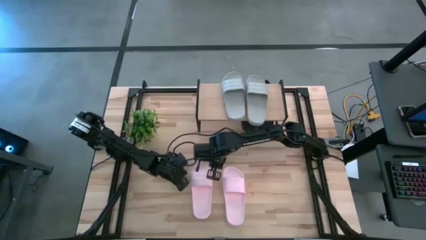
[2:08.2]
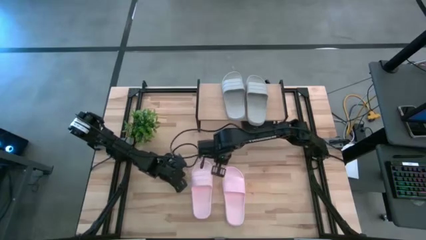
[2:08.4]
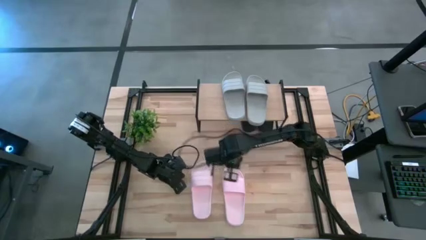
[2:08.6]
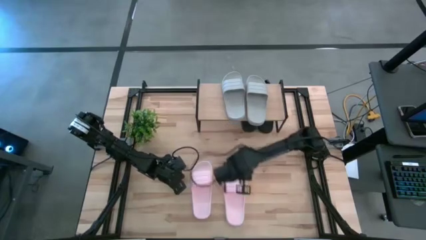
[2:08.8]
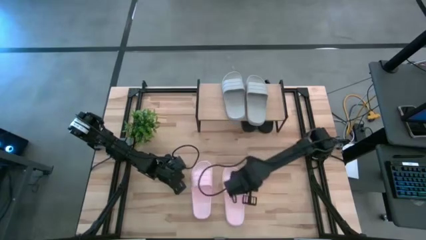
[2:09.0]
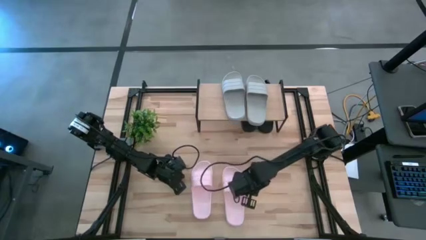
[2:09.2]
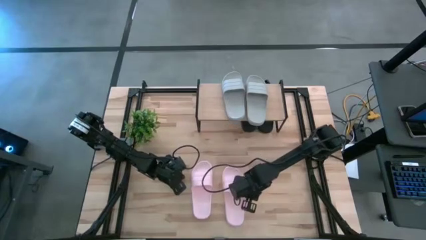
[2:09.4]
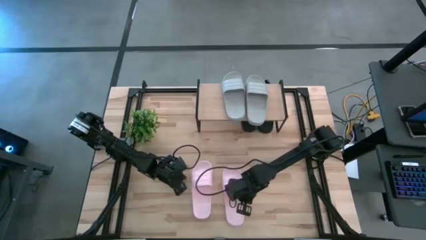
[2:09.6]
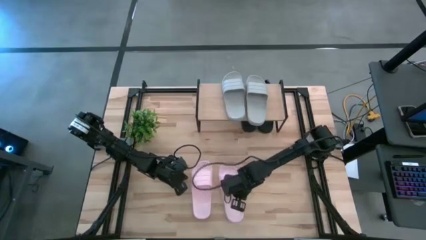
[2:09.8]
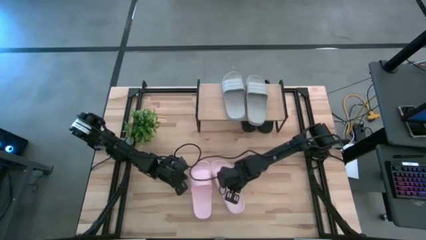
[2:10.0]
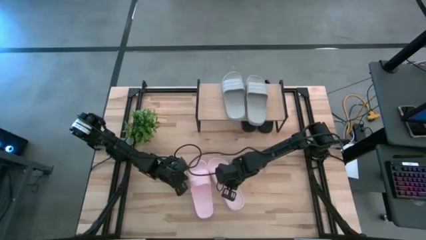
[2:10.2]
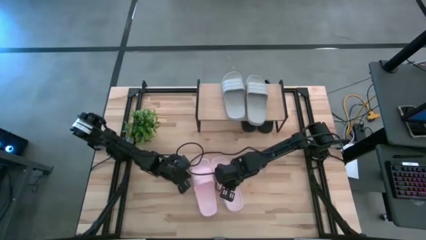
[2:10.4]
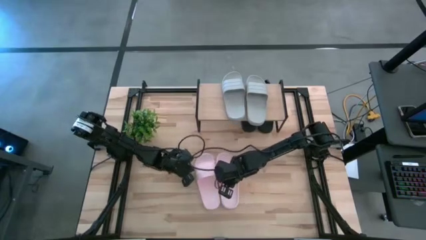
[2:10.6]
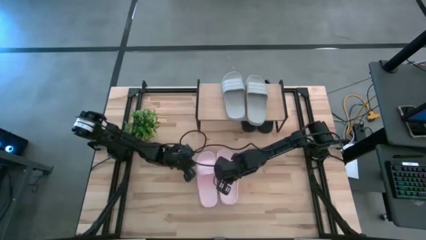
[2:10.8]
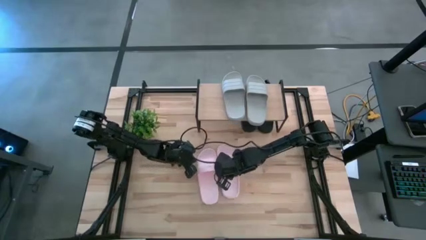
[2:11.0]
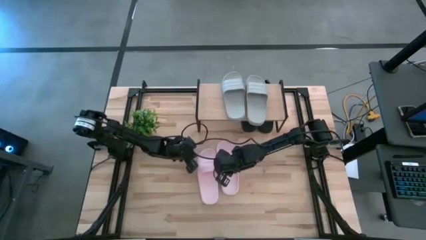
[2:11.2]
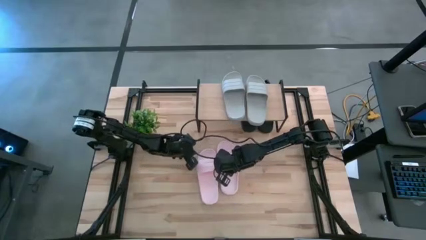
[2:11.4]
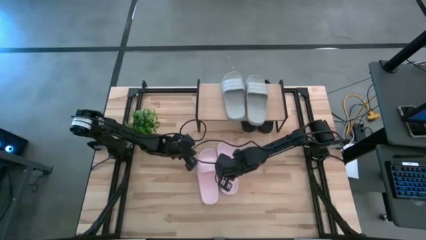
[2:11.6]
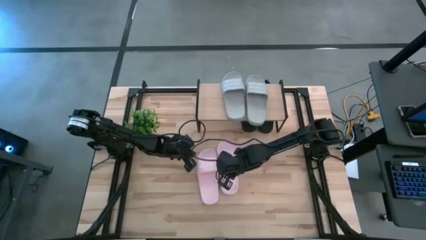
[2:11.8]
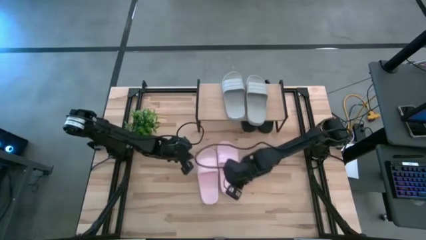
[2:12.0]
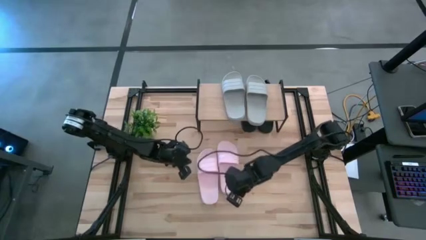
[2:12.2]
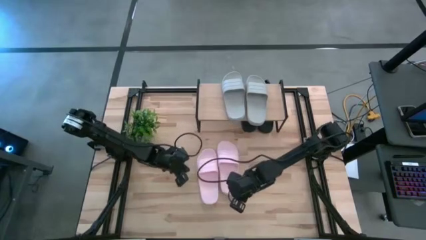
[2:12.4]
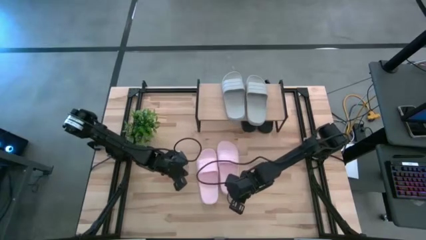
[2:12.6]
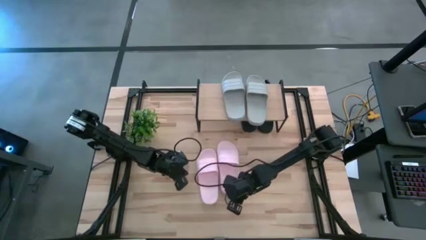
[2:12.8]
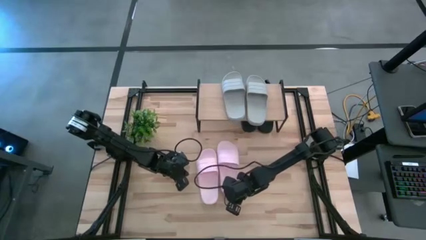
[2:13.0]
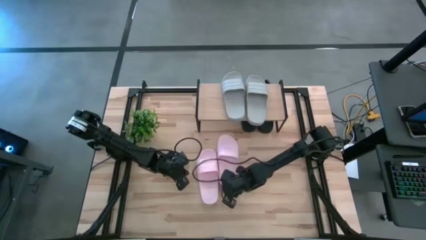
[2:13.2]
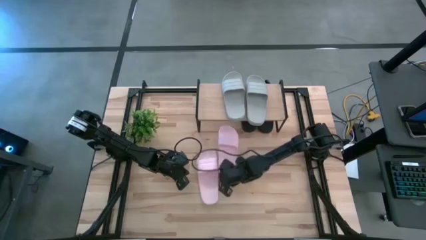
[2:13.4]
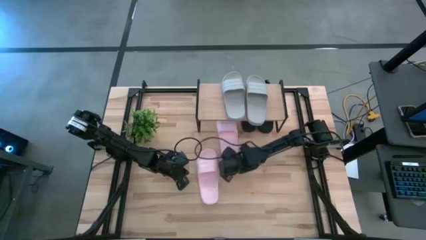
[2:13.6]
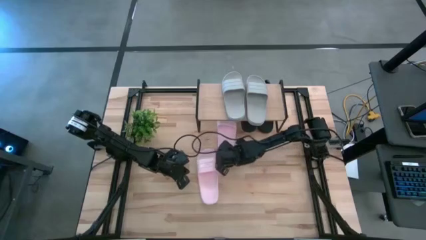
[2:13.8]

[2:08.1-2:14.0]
Task: Pick and place slides into the shelf
Move the right pink slipper under the shelf

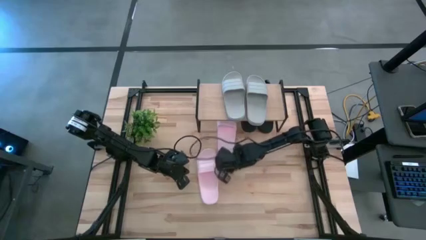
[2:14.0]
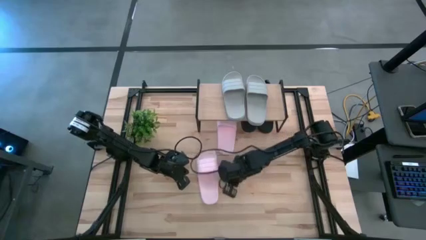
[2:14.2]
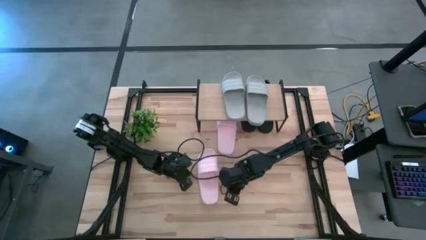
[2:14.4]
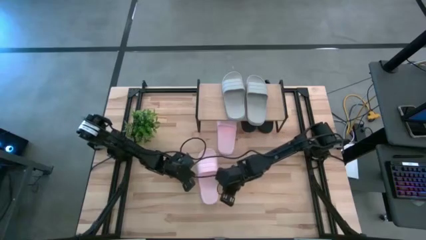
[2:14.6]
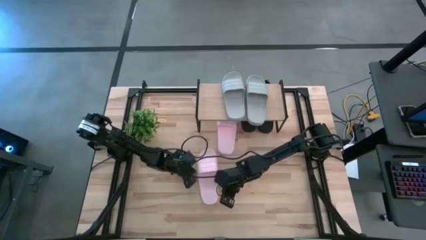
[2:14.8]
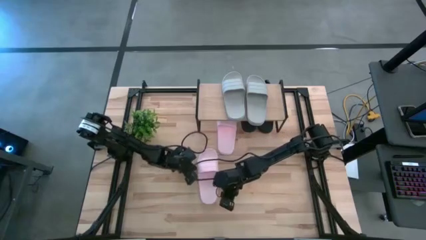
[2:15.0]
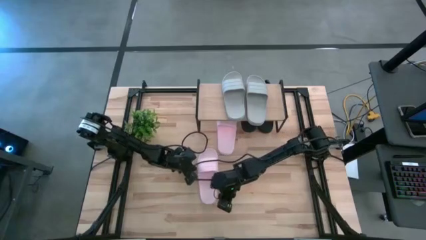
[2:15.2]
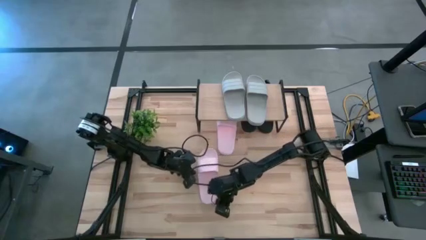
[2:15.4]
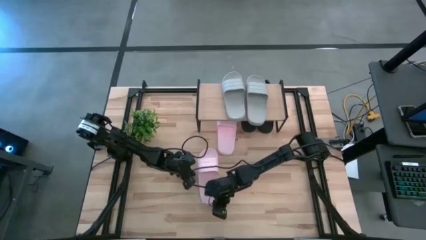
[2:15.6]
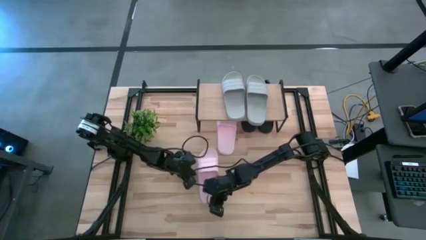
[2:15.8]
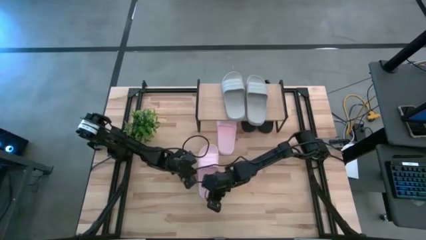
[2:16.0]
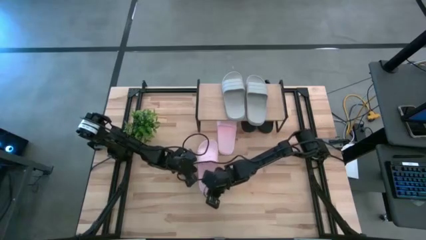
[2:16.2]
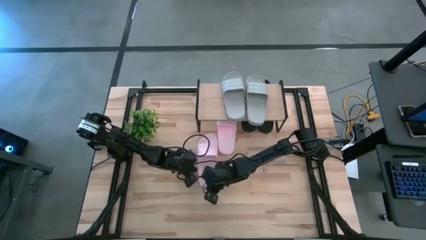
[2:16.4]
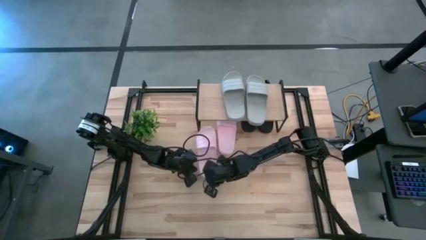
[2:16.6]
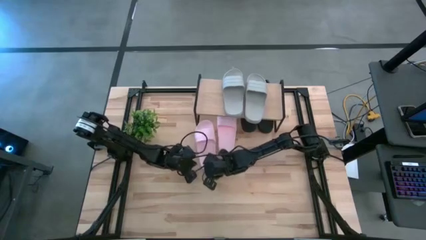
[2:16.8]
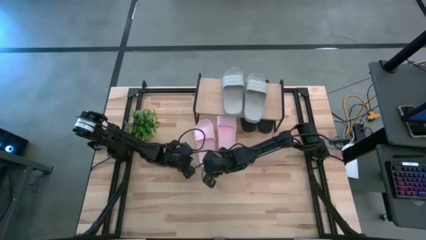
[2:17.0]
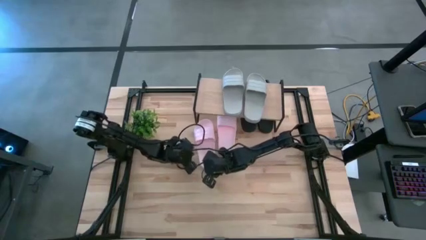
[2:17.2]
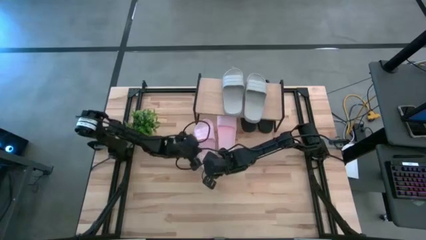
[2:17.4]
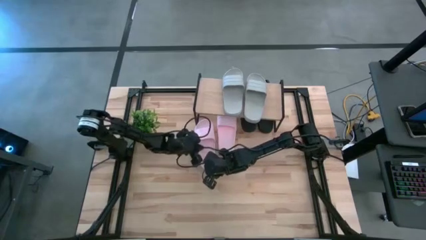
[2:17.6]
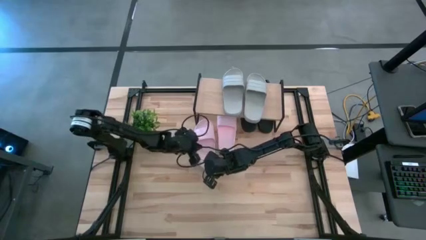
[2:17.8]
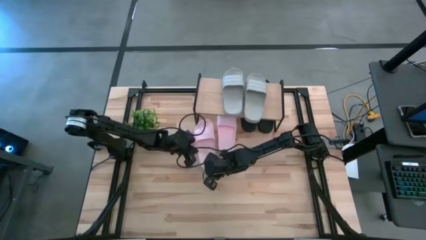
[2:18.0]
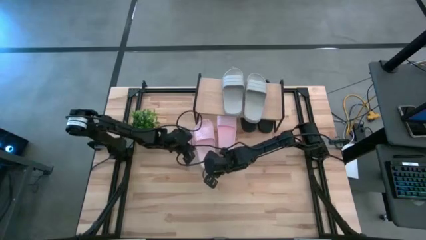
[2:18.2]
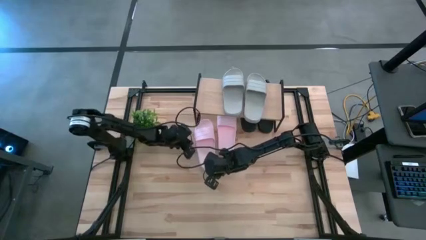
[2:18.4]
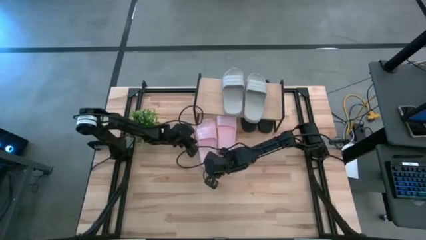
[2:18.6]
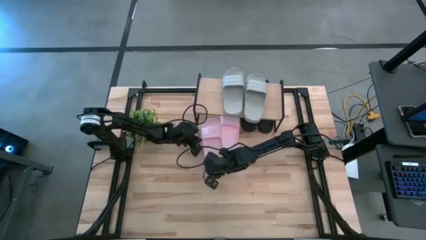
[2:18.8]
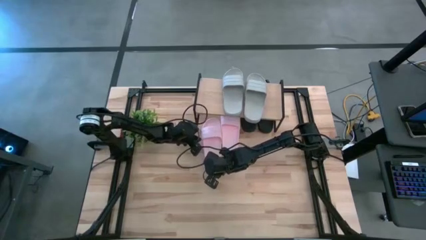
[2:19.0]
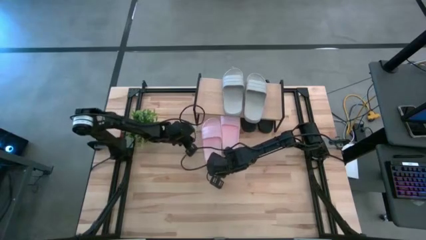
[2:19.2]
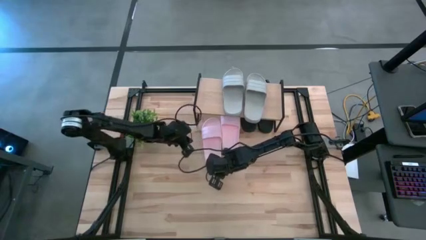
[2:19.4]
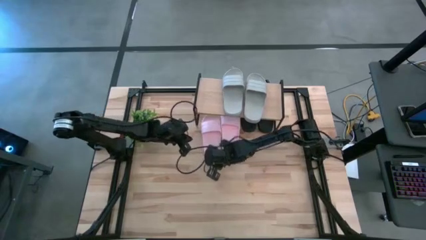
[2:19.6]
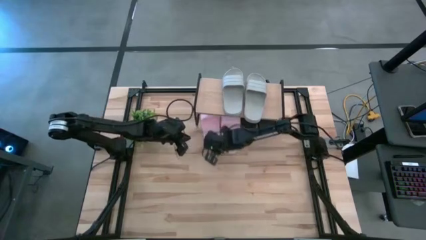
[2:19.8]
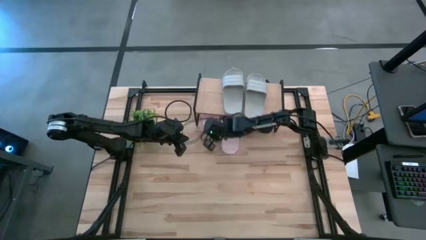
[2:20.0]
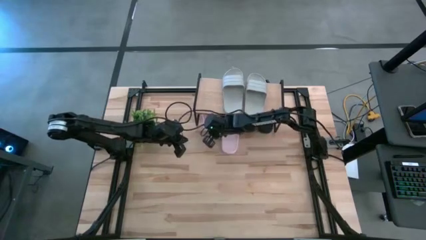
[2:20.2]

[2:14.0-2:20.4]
Move the left pink slipper under the shelf

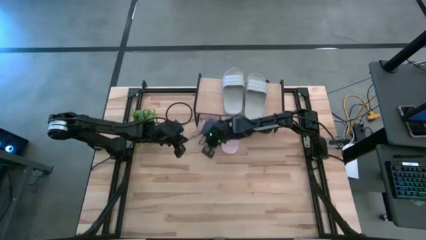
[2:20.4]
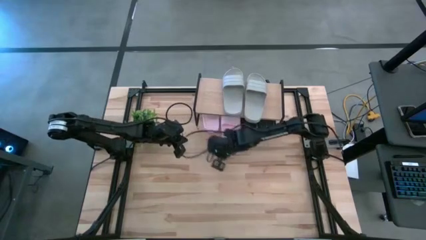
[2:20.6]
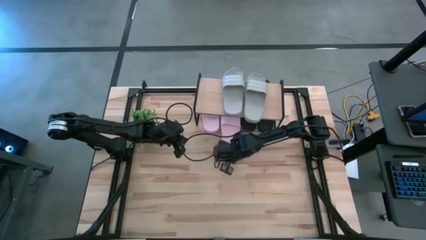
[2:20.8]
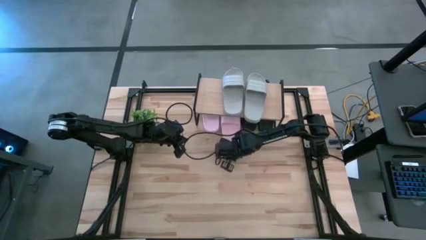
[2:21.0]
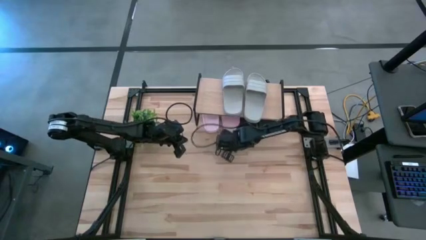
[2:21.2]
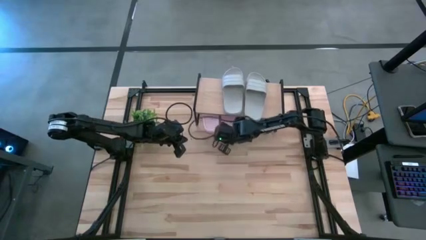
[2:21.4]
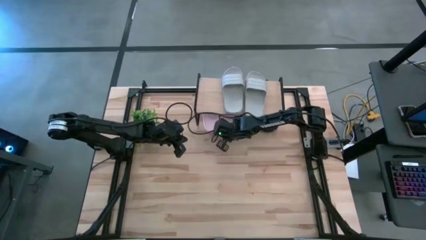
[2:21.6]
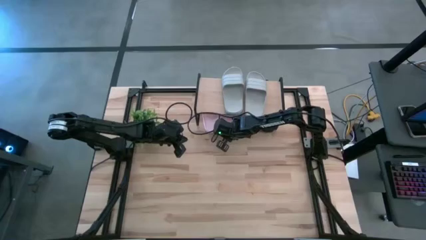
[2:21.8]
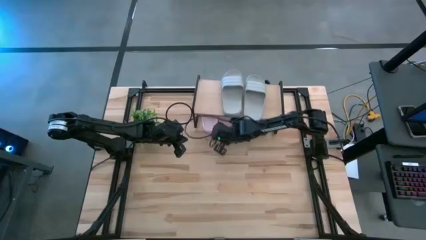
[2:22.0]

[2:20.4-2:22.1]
Adjust the right pink slipper

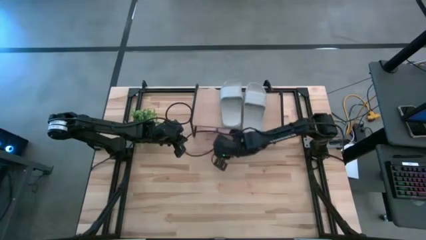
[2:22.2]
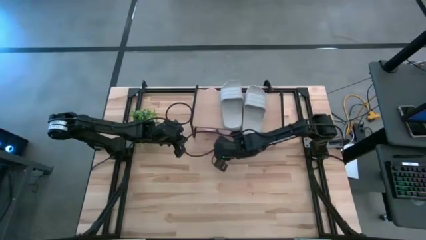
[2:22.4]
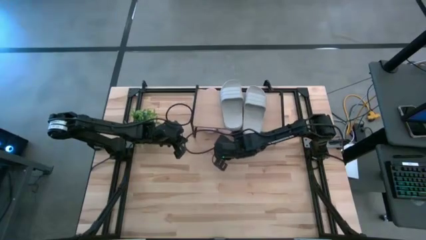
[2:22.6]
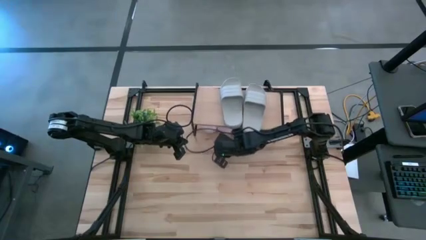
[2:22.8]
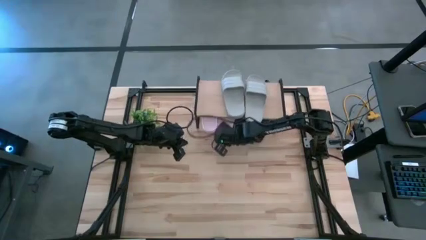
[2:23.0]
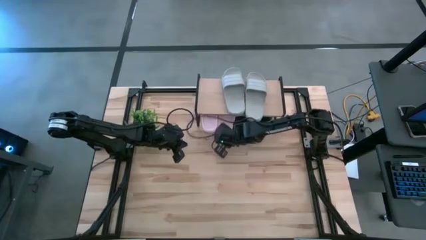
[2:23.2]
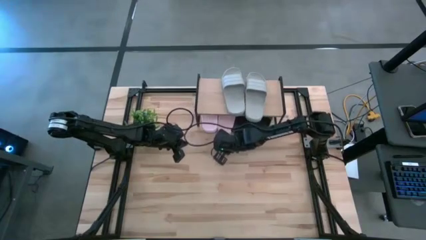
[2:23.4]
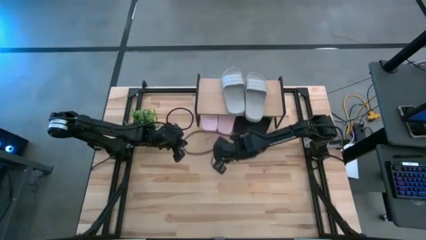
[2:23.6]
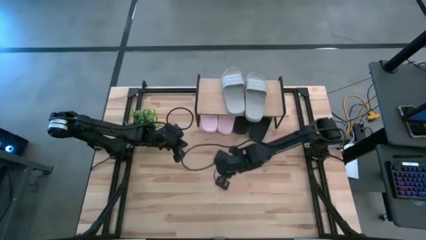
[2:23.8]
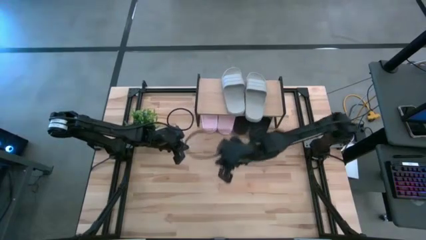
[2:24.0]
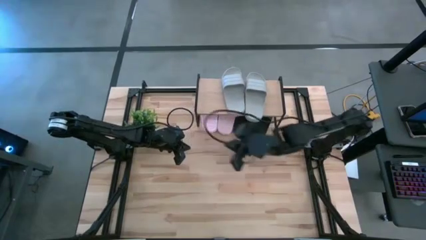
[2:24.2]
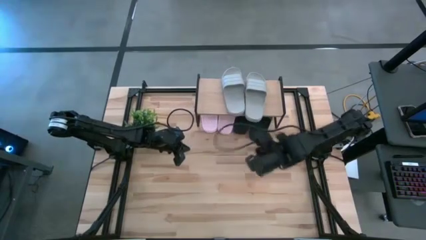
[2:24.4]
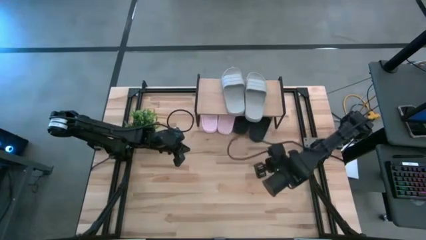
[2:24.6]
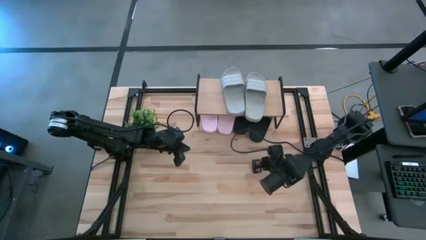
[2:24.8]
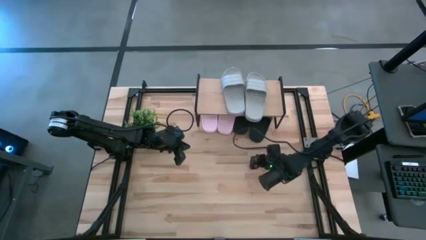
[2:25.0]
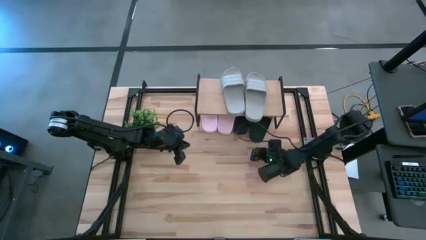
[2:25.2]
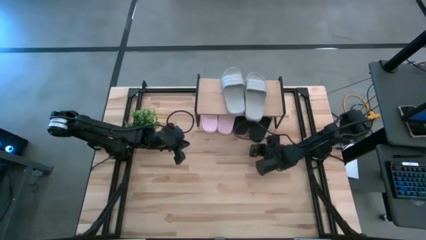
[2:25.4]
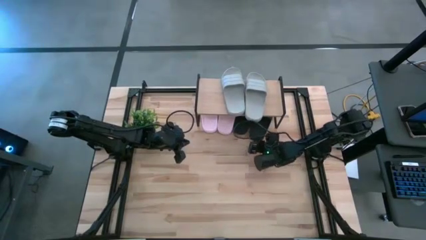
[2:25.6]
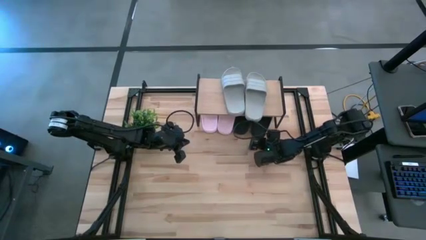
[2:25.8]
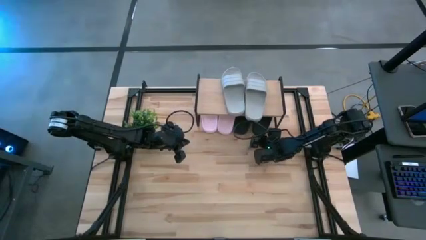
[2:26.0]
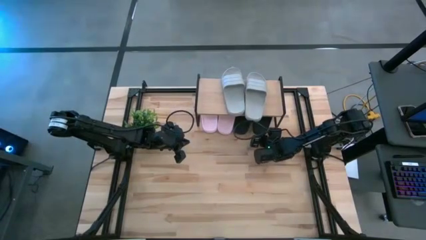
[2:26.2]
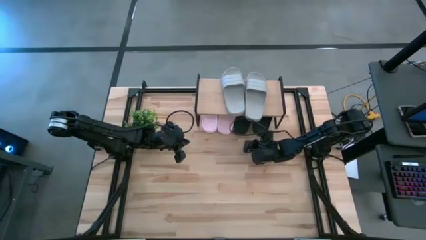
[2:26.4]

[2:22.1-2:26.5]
Adjust the right black slipper
